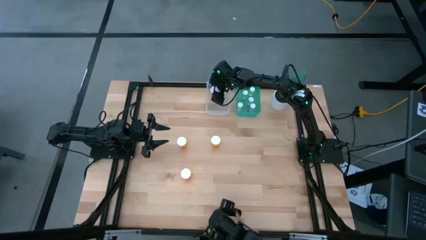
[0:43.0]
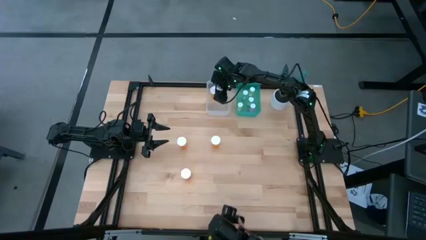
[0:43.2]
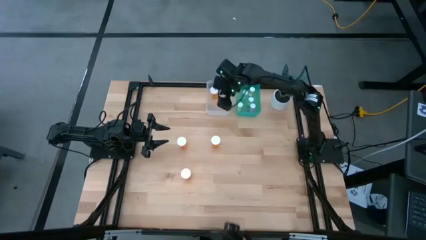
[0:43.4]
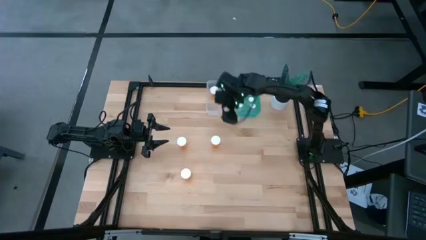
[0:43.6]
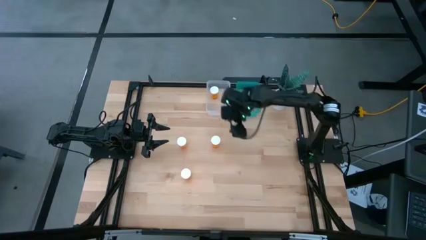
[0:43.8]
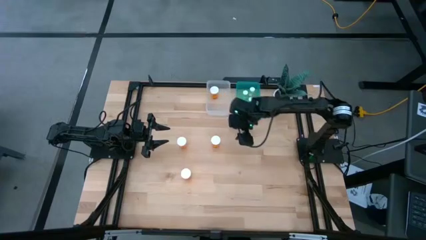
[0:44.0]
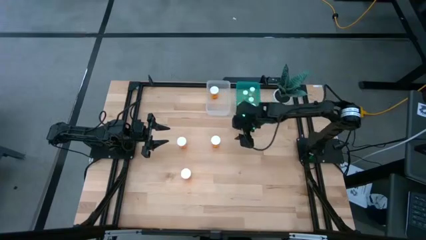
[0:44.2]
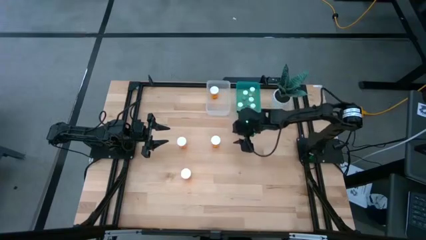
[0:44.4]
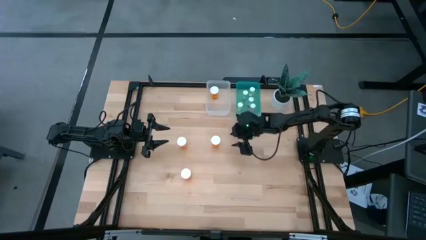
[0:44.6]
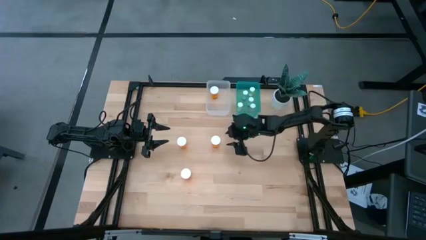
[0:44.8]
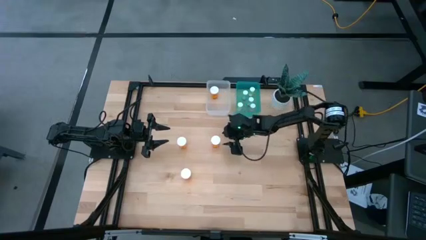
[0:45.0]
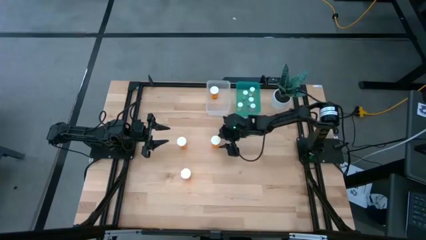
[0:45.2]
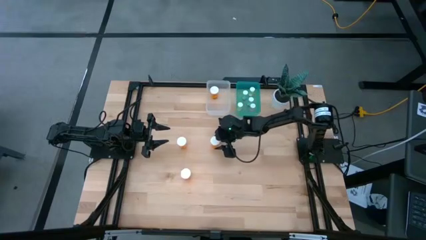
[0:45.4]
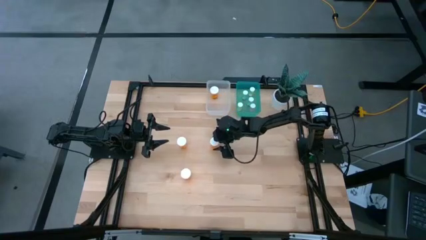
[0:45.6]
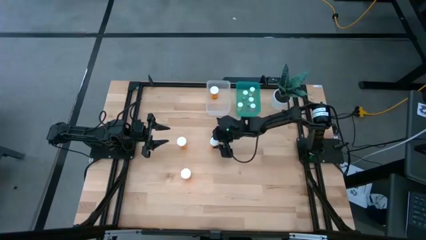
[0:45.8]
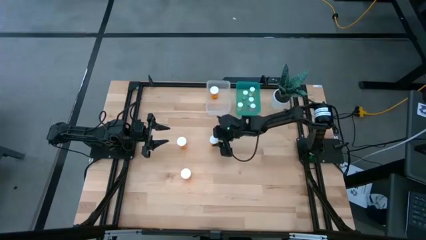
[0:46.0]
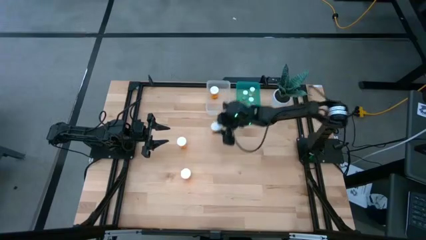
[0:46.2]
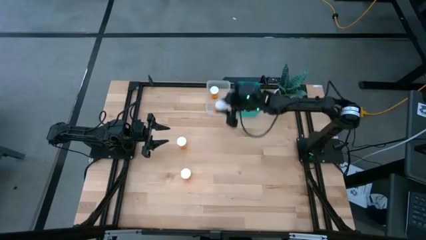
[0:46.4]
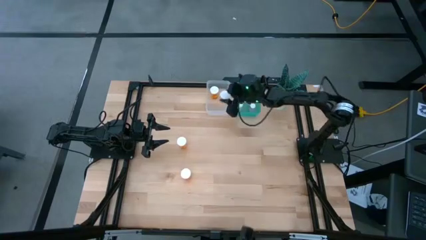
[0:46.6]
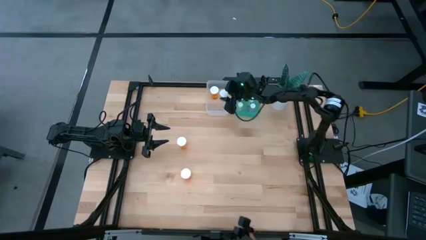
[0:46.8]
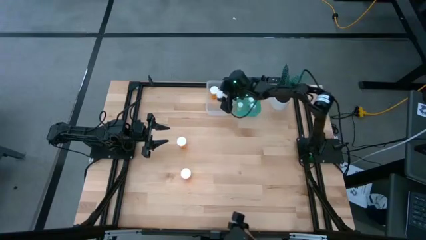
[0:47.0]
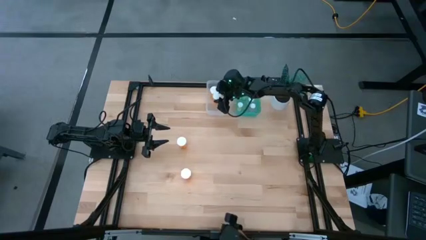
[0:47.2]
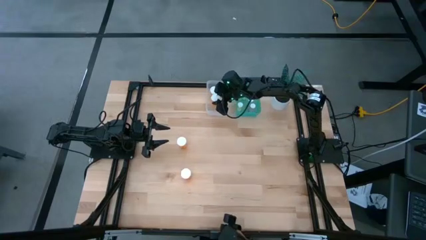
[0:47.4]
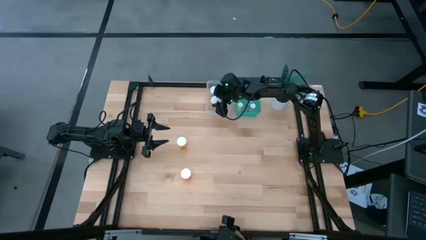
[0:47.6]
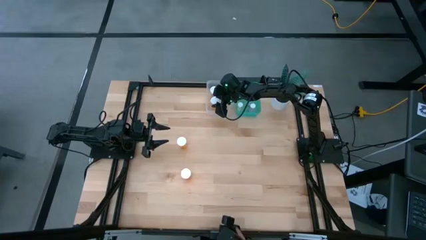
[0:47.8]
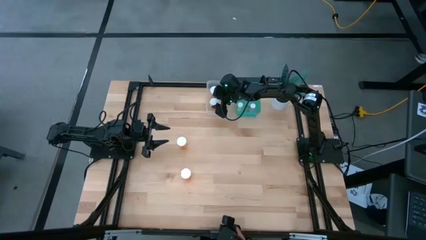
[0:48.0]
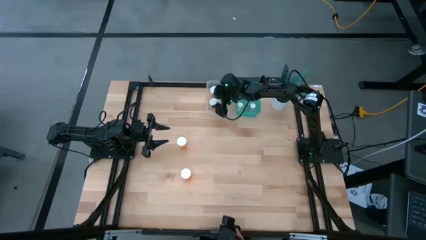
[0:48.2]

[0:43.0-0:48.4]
Task: Pick and place medicine bottles into bin by pill shape (circle, oval)
Put the large orange pill bottle into the transparent bin

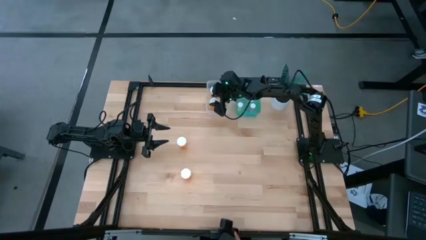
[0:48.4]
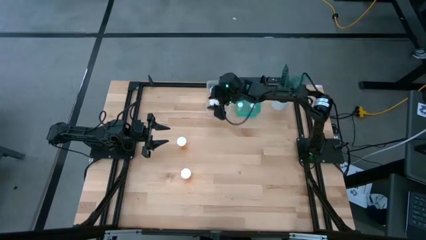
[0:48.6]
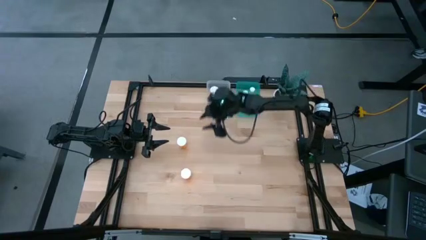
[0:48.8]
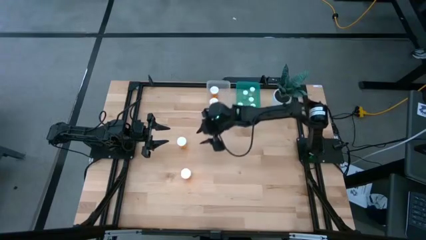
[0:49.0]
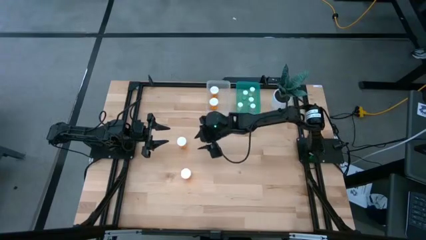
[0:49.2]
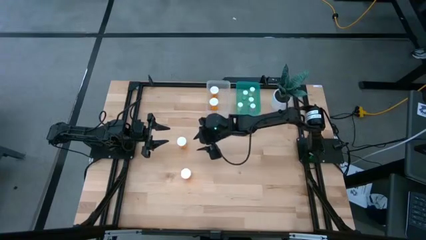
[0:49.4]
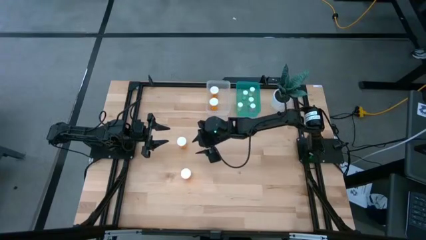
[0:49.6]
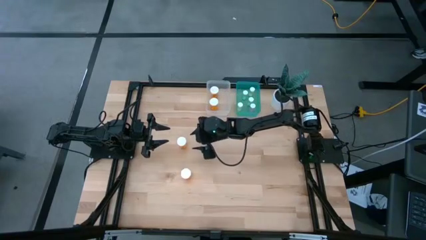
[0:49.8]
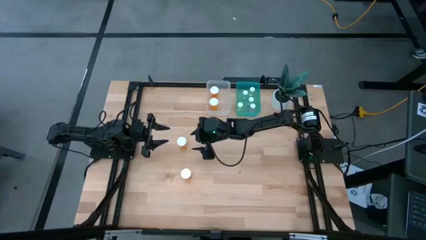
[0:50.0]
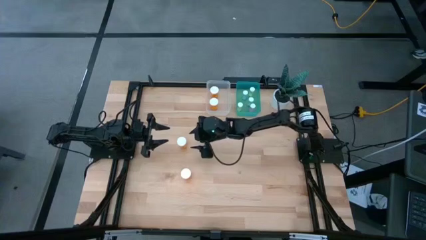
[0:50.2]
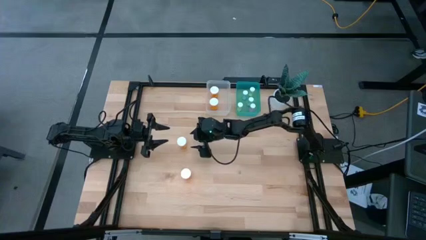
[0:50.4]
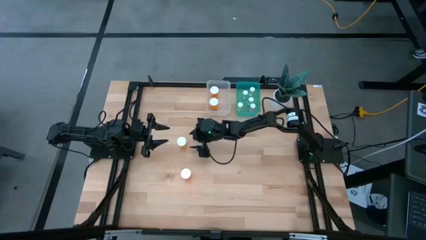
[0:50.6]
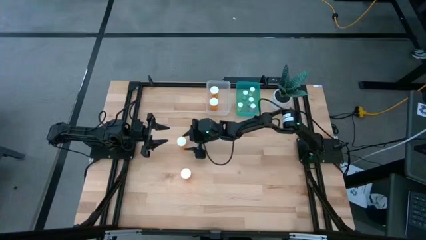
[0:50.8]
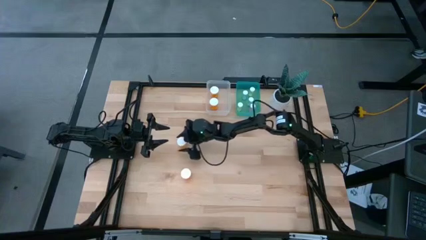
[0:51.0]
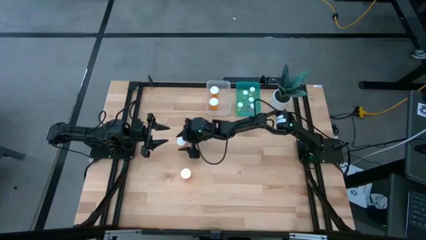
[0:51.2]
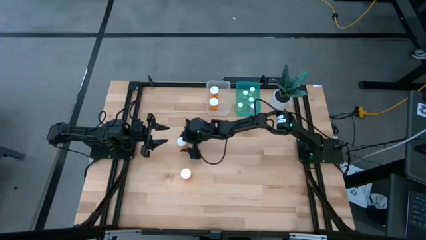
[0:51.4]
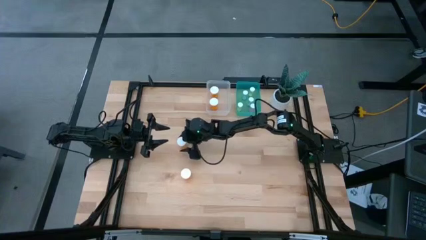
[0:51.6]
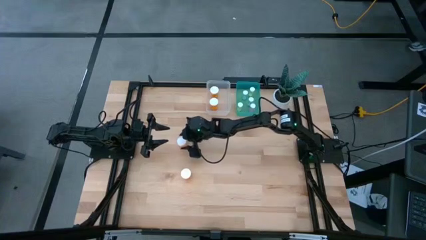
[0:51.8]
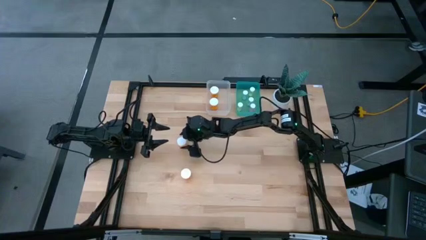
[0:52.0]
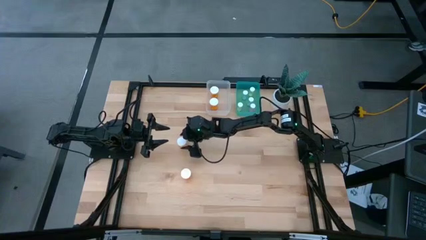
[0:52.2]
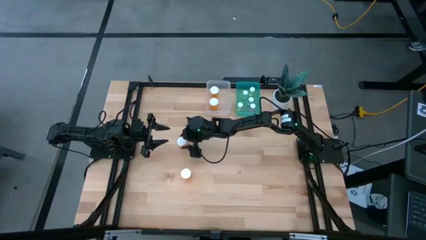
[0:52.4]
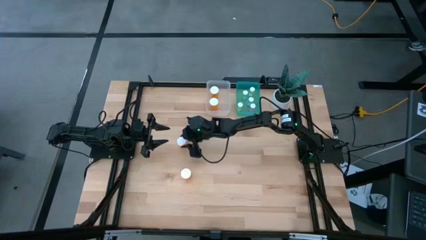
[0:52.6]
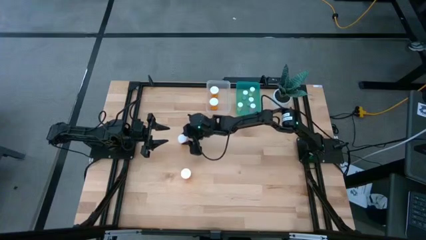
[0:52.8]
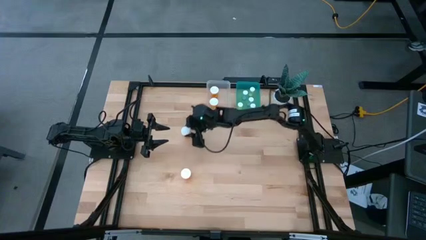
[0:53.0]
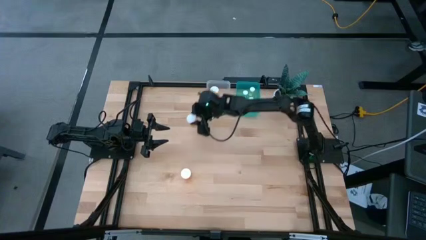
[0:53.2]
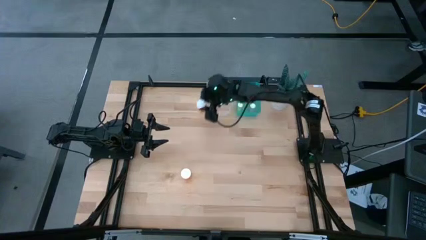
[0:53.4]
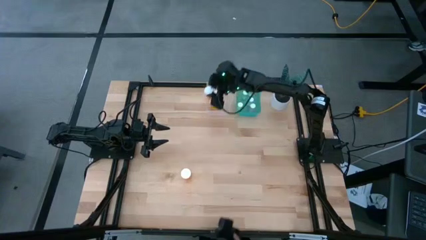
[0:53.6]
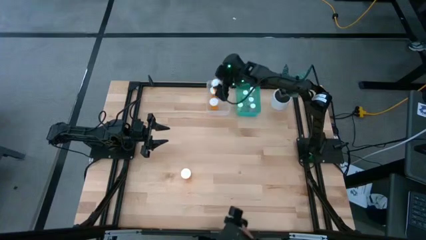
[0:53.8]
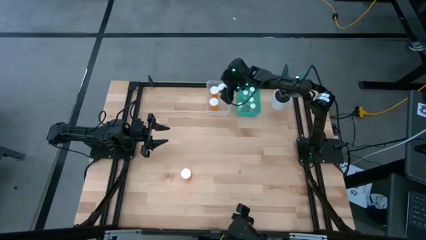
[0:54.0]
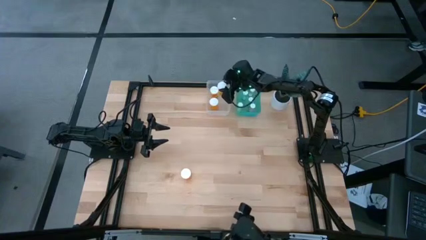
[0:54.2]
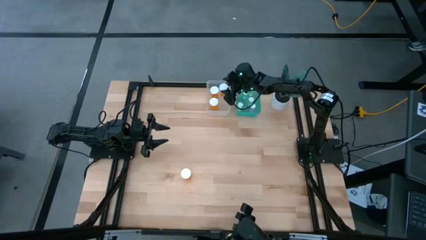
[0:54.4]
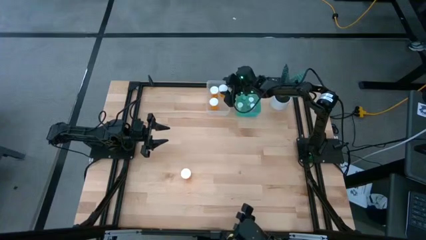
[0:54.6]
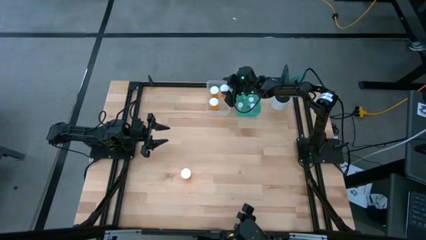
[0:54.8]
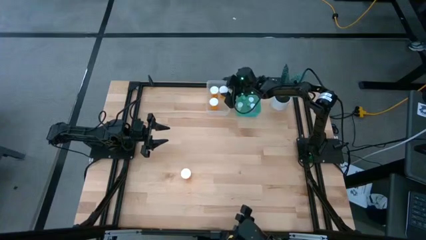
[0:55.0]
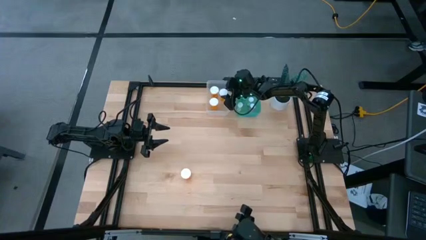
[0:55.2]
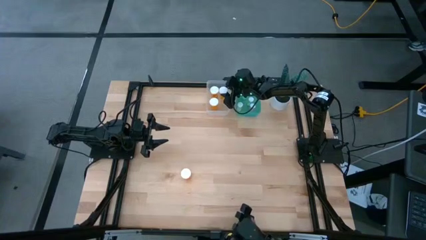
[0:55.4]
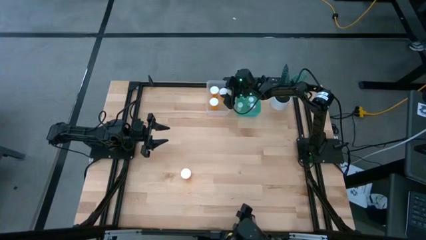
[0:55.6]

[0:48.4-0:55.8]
Put the large orange pill bottle into the transparent bin

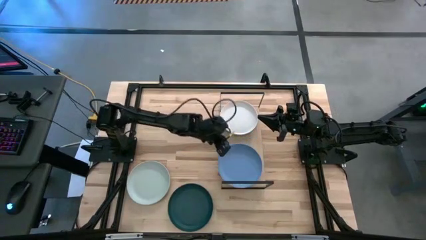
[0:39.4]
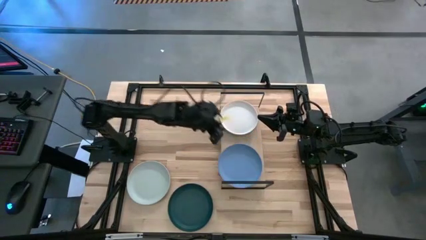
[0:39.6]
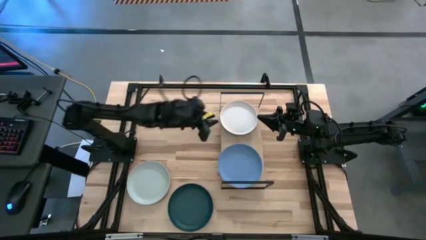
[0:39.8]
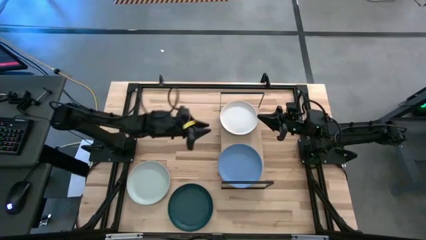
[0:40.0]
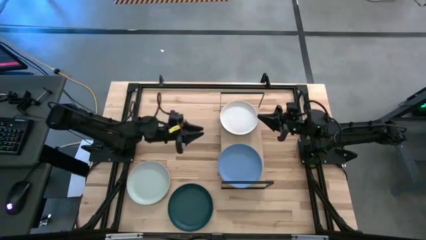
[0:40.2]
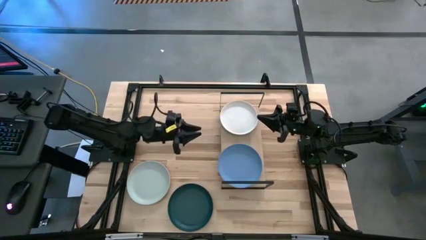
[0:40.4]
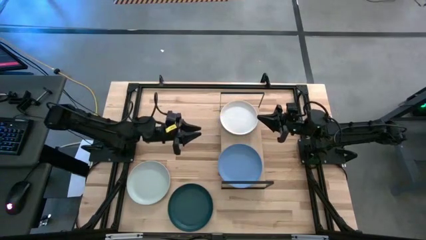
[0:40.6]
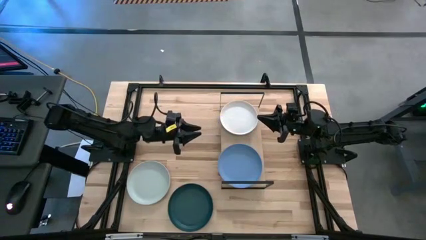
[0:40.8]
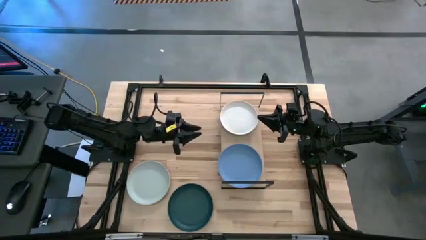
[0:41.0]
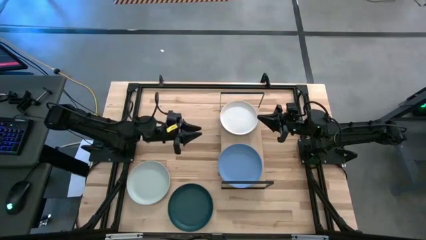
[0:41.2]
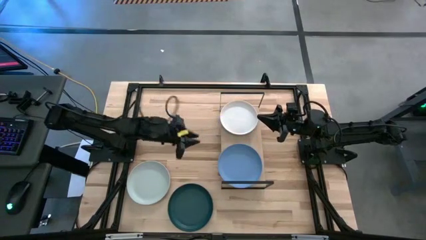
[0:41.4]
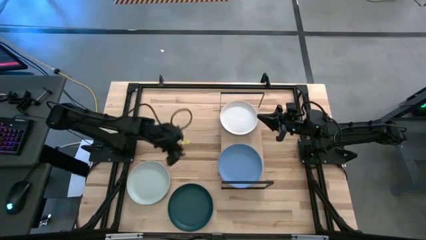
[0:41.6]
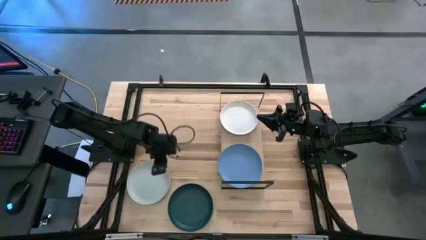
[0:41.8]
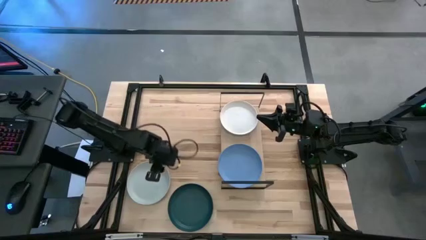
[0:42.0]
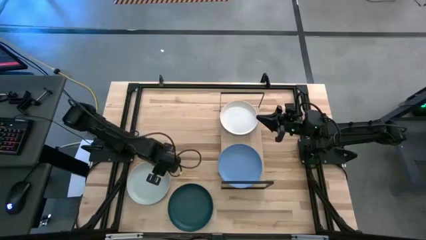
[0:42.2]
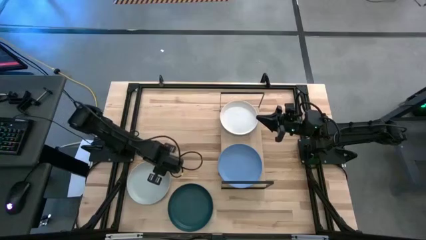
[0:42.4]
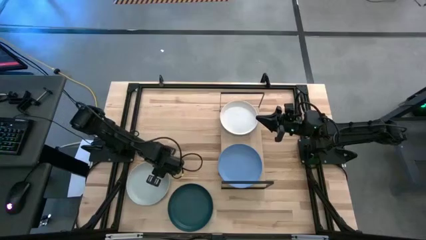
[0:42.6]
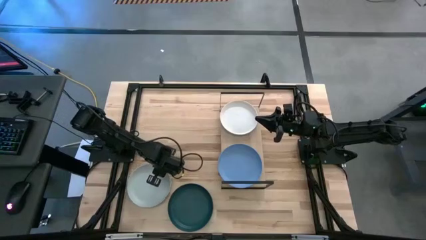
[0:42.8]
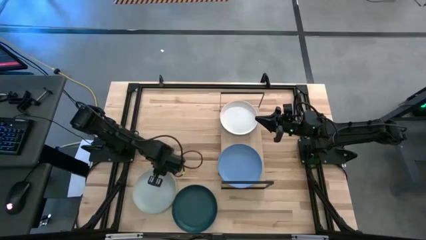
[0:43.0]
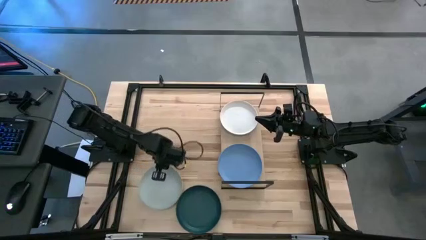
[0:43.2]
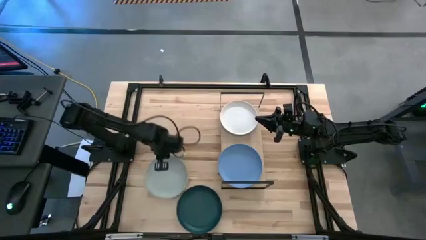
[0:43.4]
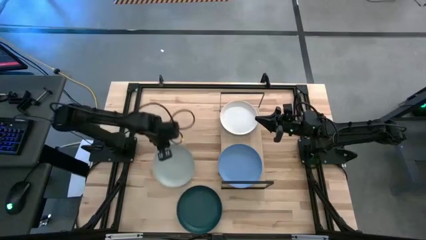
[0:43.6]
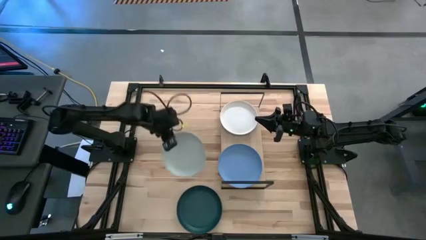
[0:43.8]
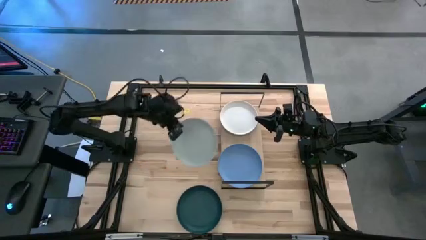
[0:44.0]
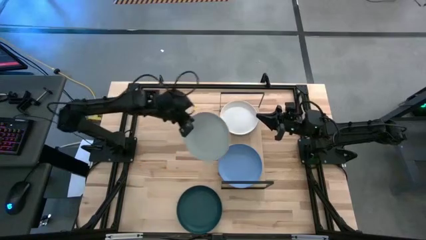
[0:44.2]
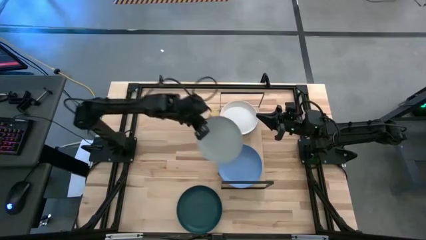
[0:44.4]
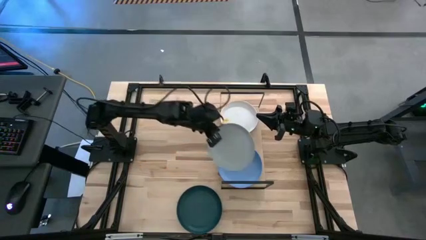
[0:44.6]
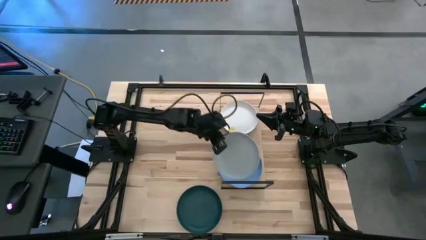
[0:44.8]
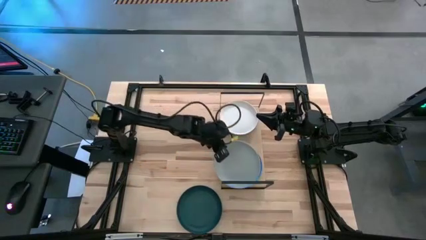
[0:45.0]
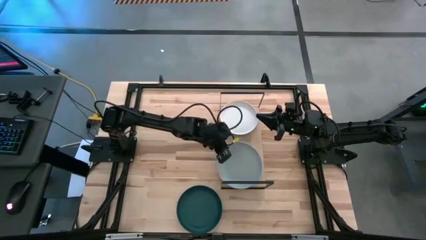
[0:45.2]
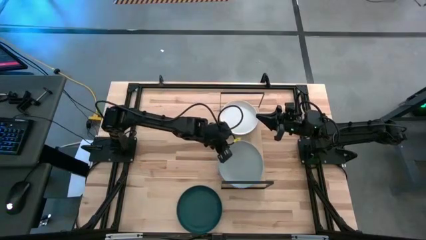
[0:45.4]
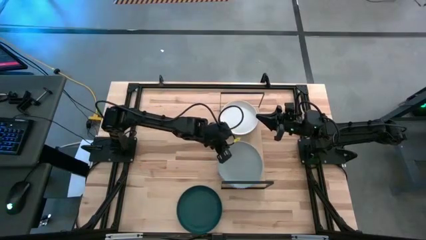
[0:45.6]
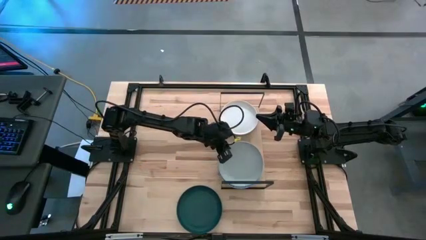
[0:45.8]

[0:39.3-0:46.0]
Task: Place and stack plates onto a shelf
Stack the gray plate on top of the blue plate on the shelf
